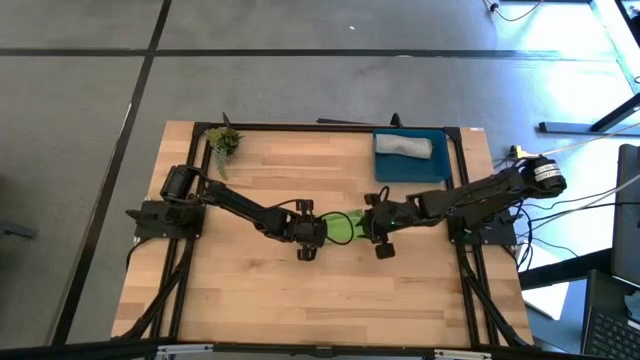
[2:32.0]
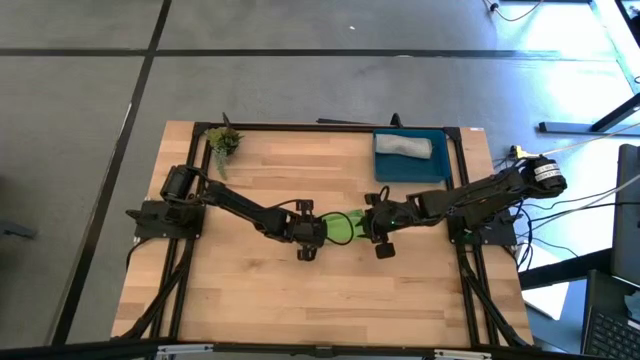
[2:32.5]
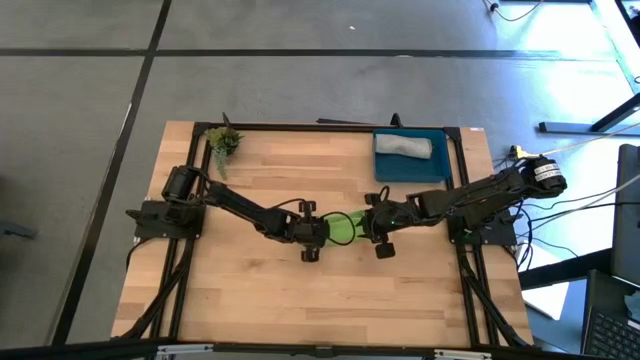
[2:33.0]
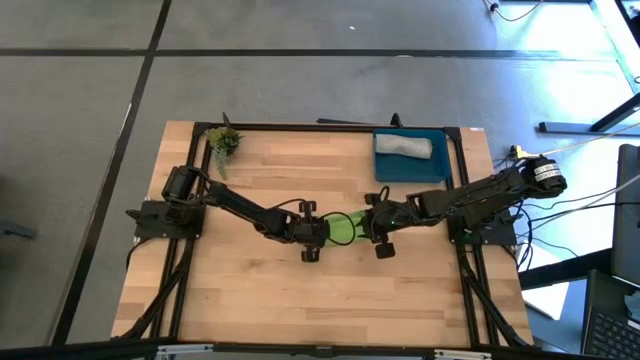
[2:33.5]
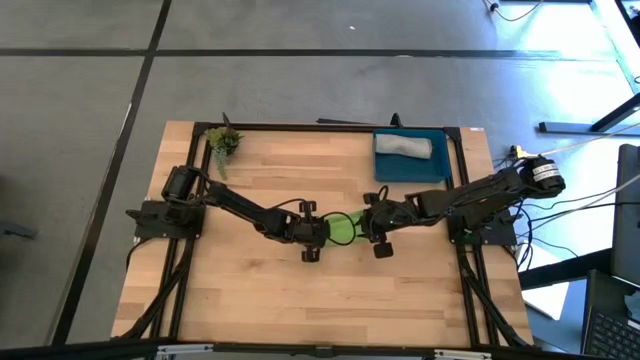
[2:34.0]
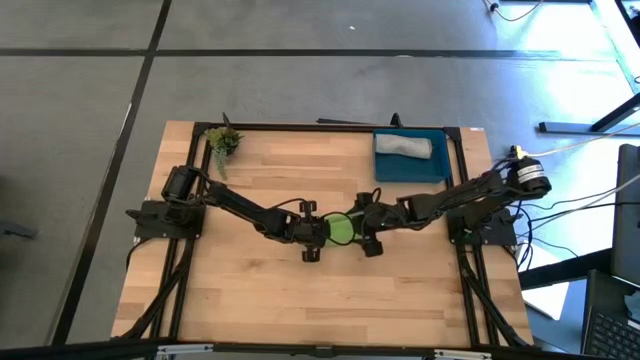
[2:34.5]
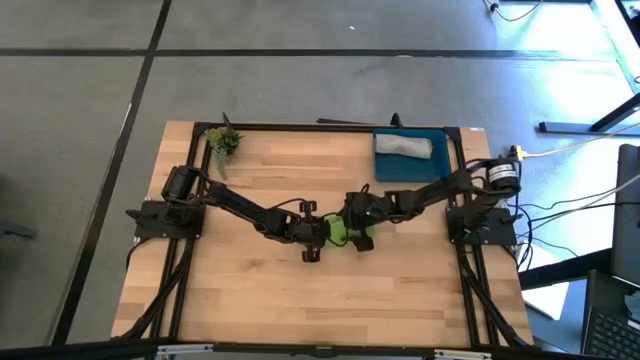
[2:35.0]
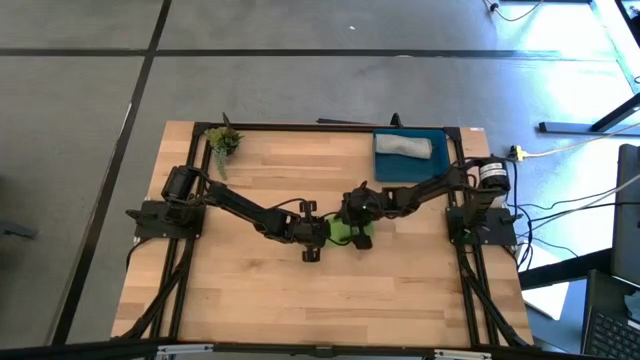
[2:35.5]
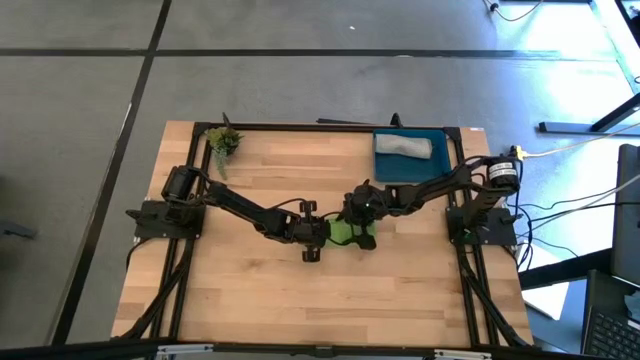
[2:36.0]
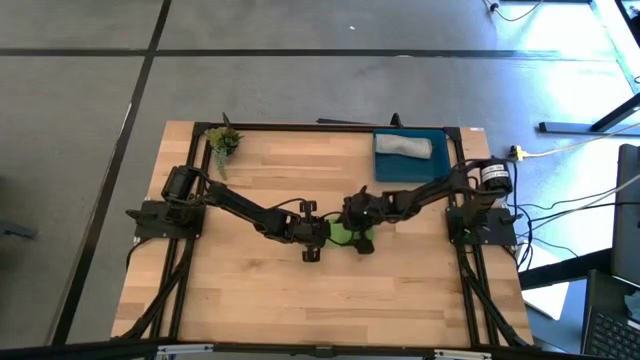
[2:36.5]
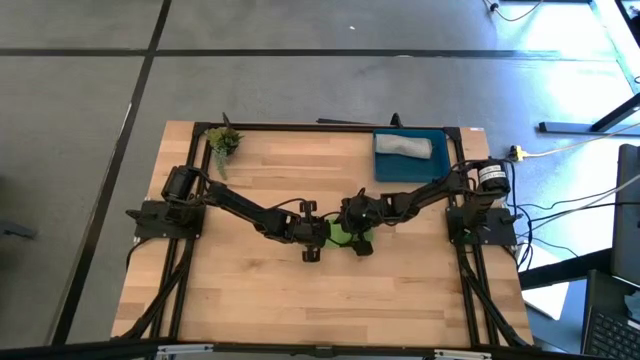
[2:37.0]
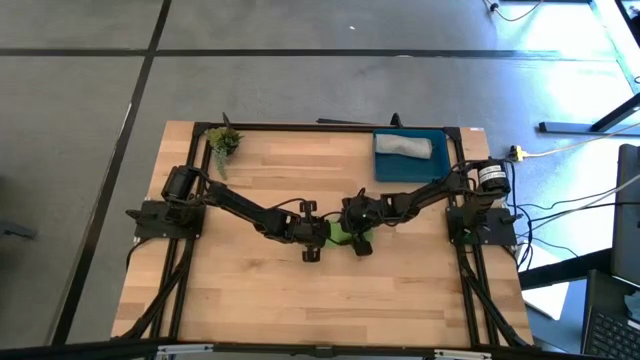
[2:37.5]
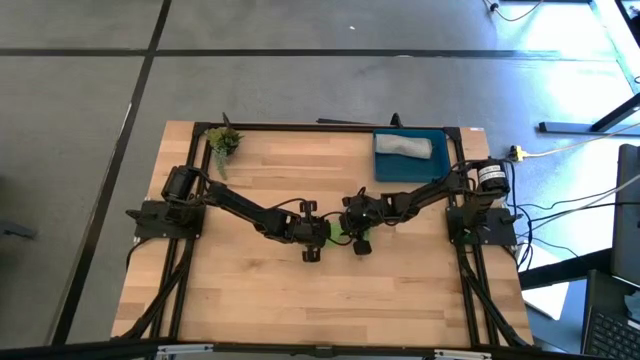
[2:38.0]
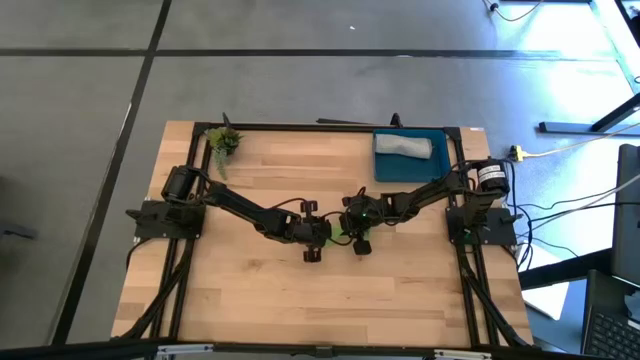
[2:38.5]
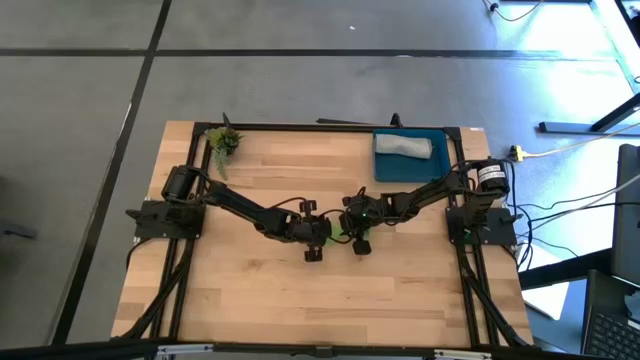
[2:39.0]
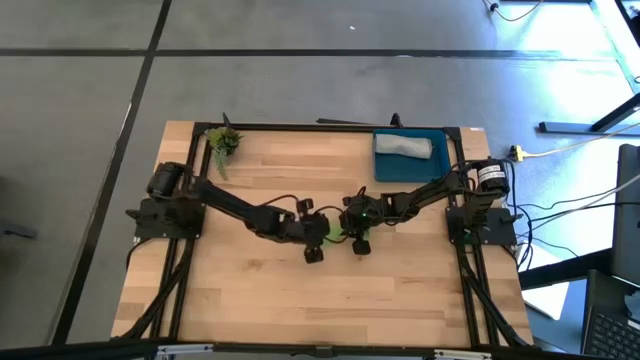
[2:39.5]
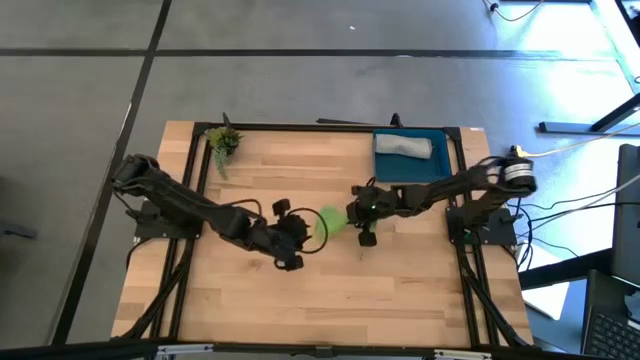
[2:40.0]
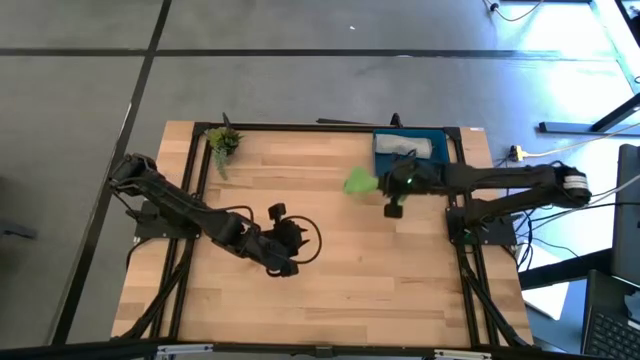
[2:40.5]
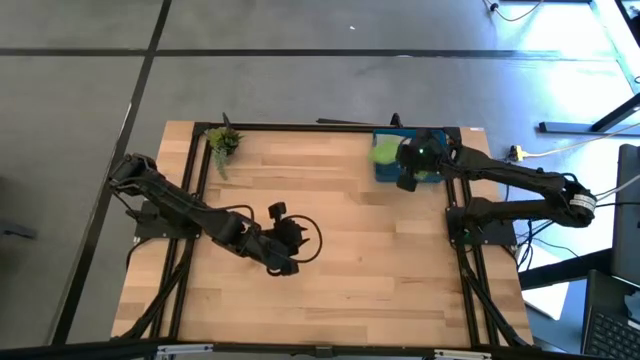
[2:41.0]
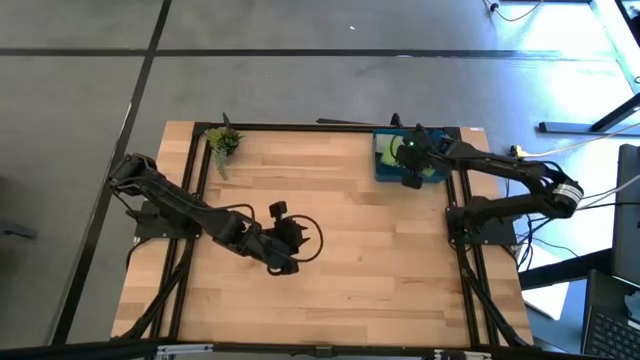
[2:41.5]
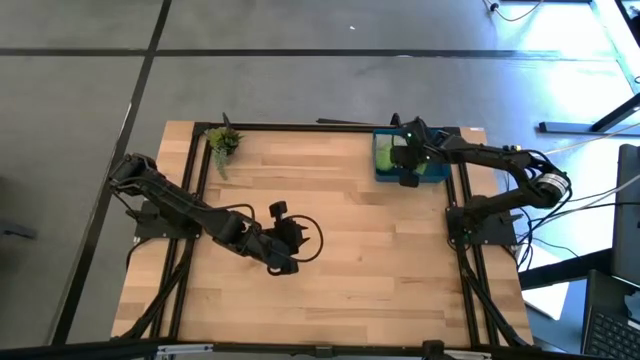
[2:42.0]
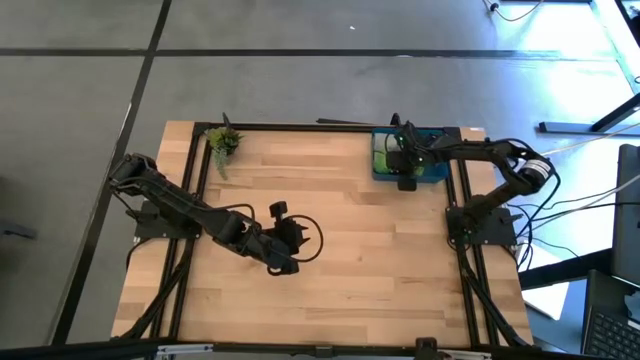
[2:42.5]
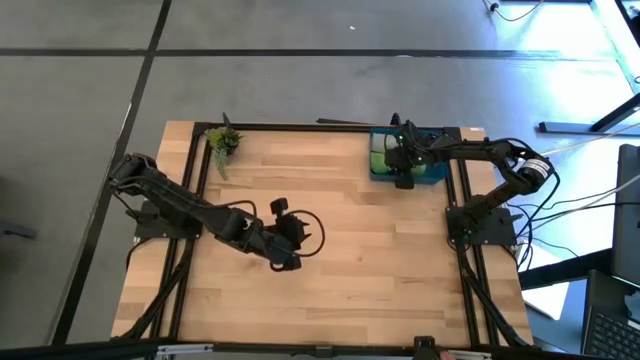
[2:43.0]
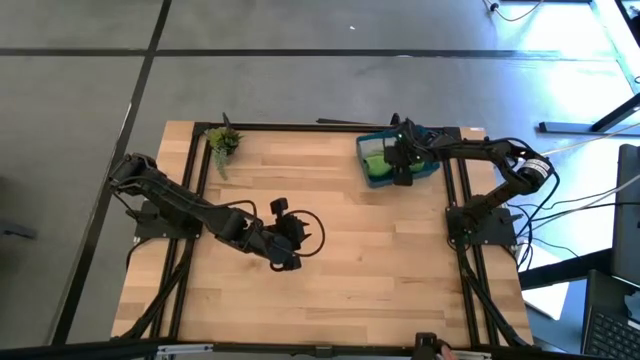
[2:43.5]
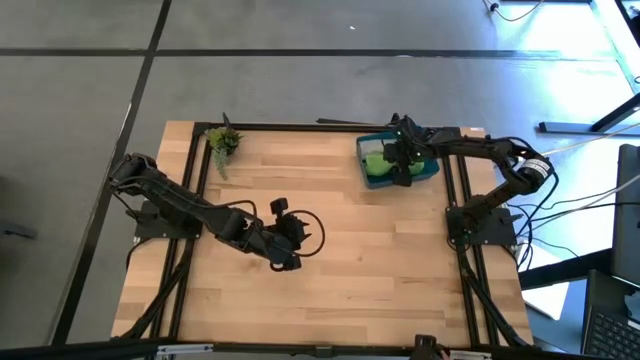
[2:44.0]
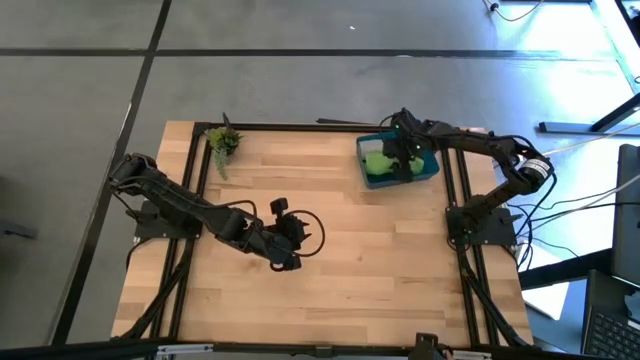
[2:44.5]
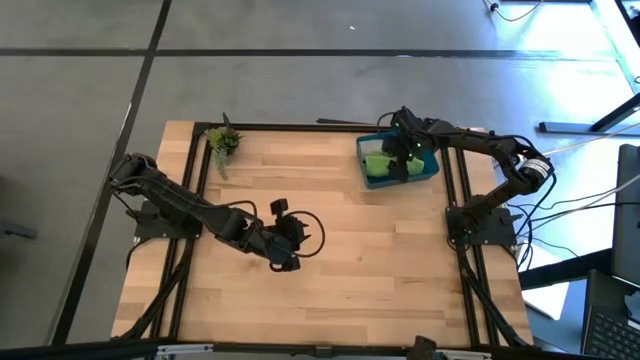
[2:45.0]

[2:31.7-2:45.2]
Task: Roll microfiber towels into tight, uniform cylinder then place into a basket
Put the rolled gray microfiber cloth into the blue bin

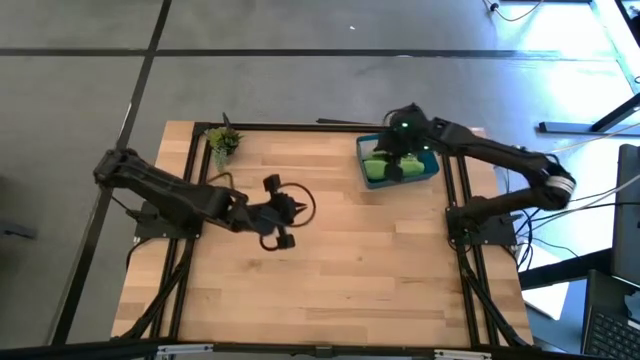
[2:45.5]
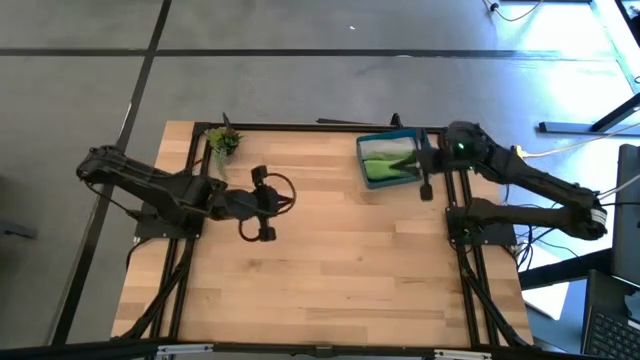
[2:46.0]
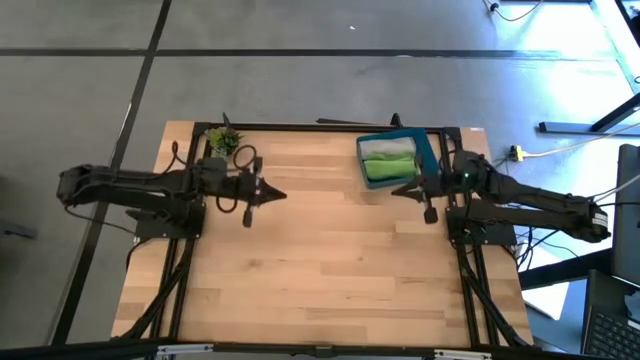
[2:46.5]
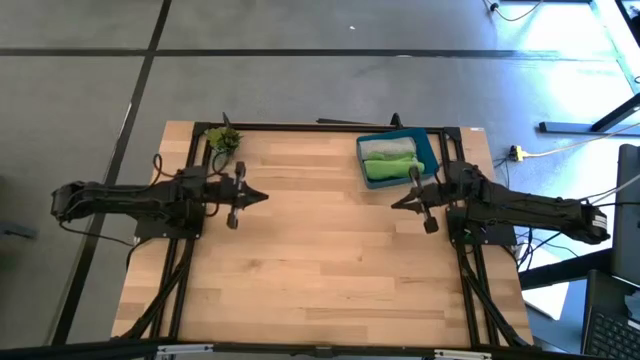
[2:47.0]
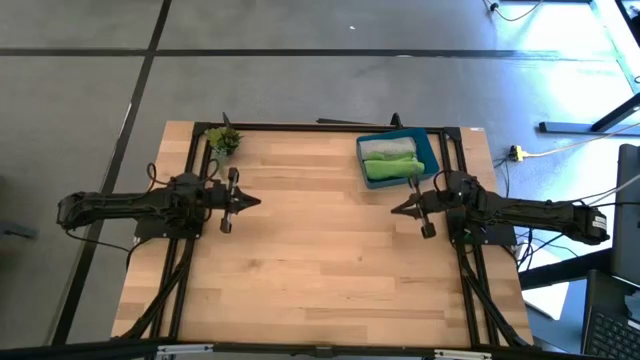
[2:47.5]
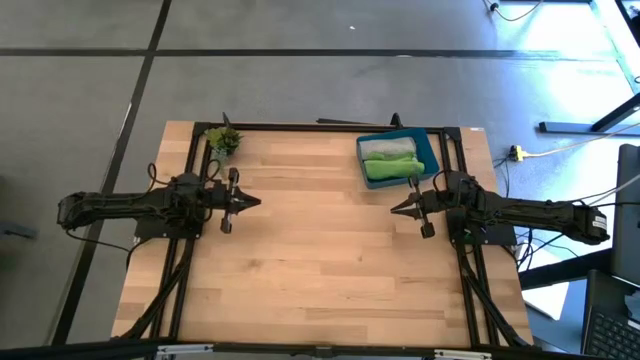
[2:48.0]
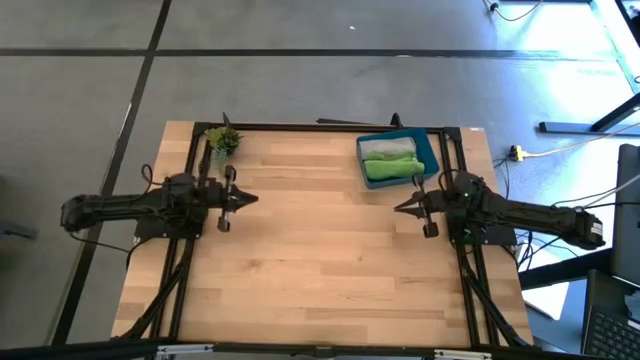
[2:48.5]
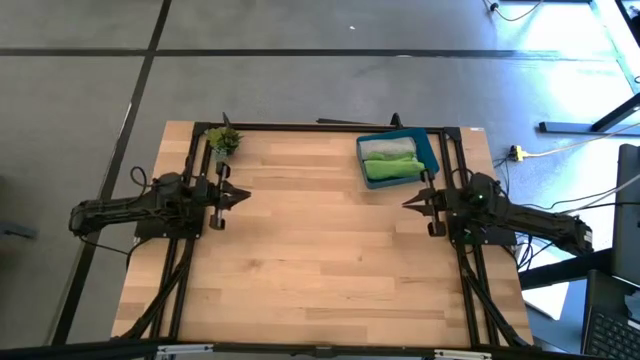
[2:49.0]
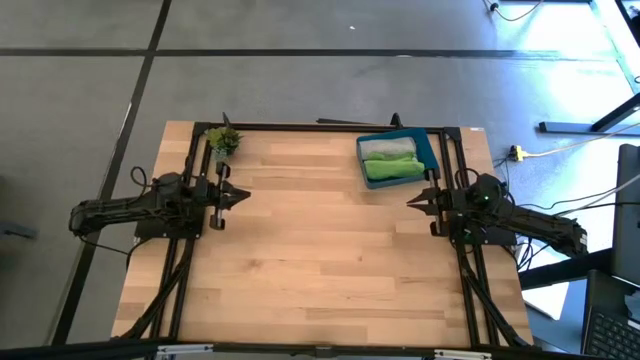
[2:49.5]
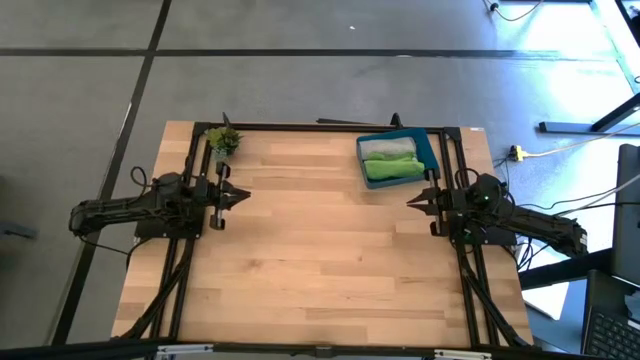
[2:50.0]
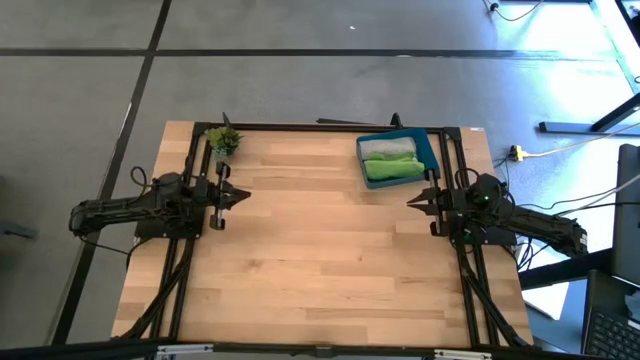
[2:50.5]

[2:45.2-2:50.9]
Return to Home Position

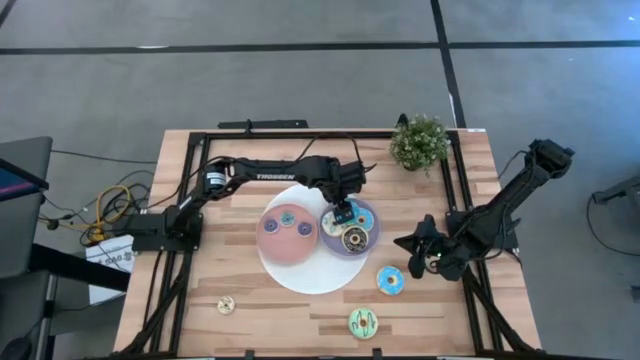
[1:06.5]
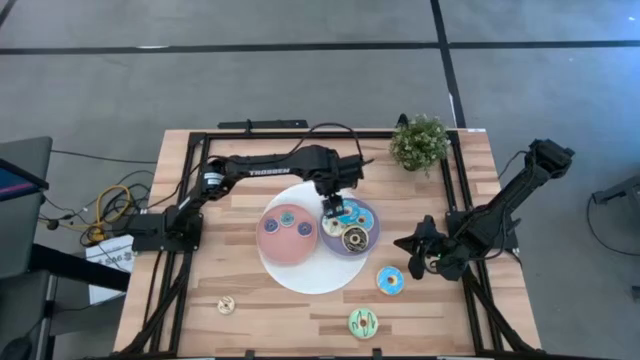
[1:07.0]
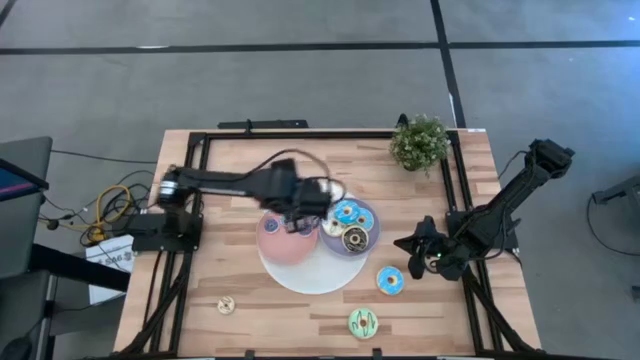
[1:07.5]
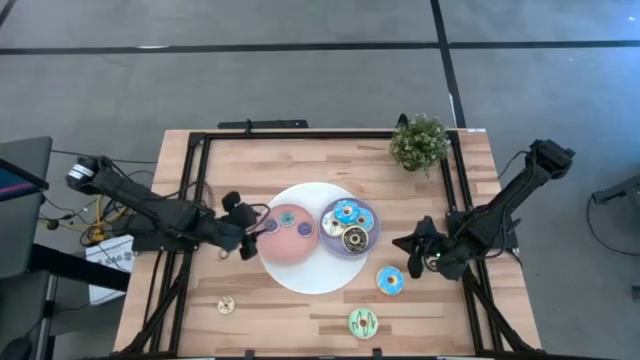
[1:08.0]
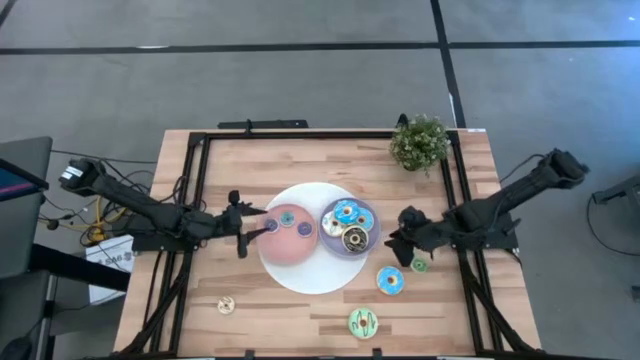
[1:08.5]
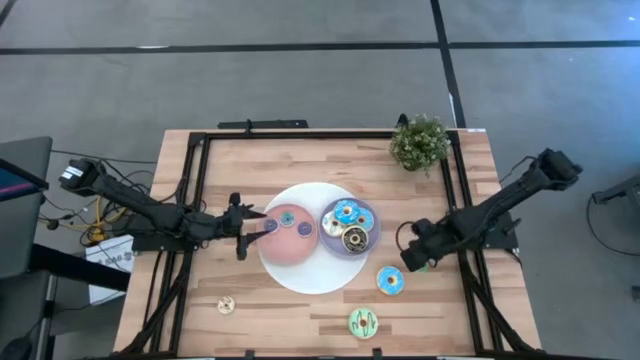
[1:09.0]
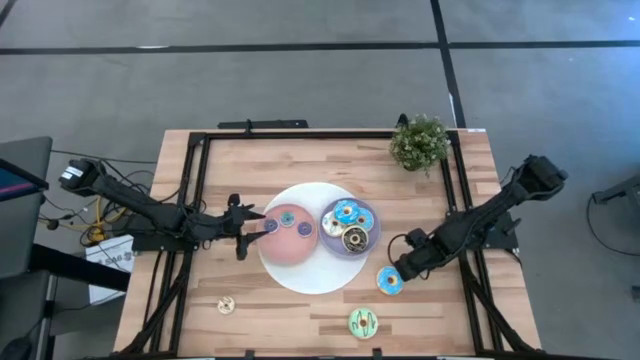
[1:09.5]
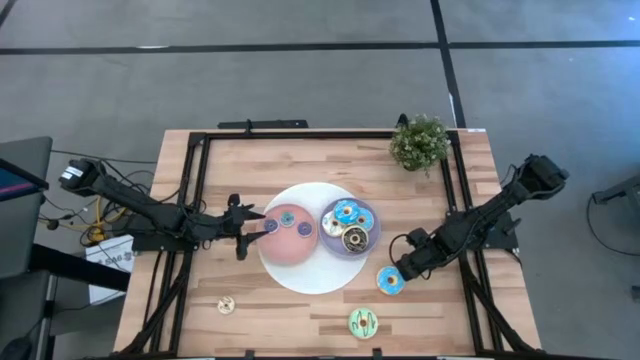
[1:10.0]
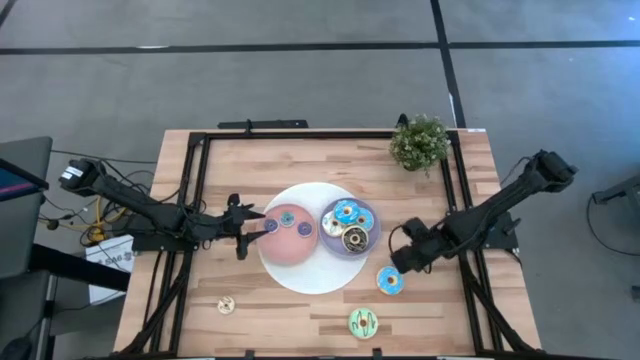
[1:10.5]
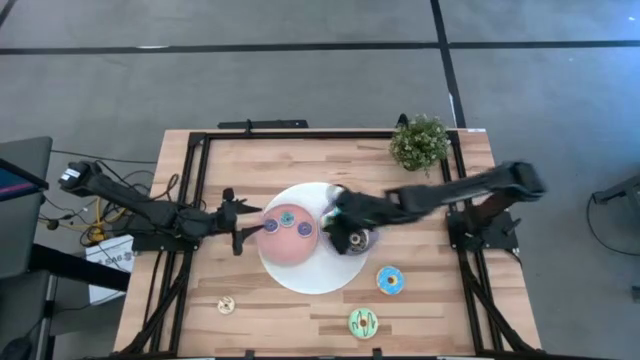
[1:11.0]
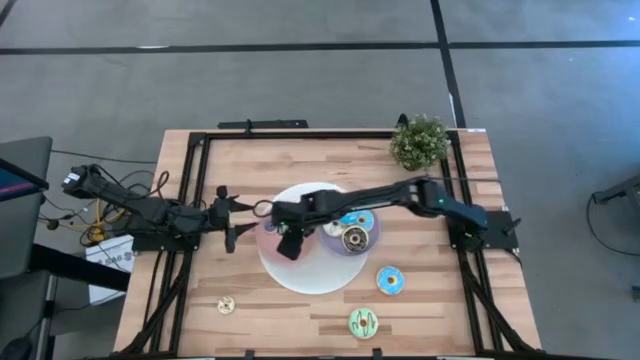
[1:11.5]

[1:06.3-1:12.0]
Task: Pick & Place donuts
Put the small green donut on the pink plate
